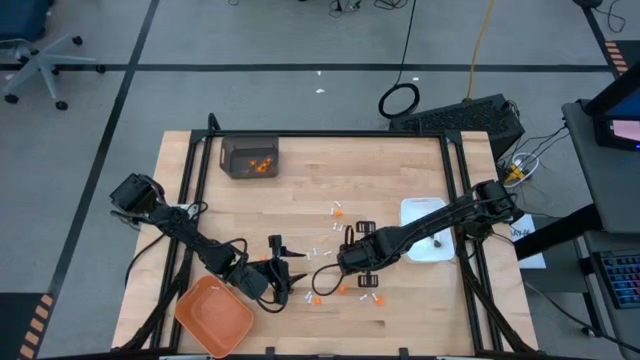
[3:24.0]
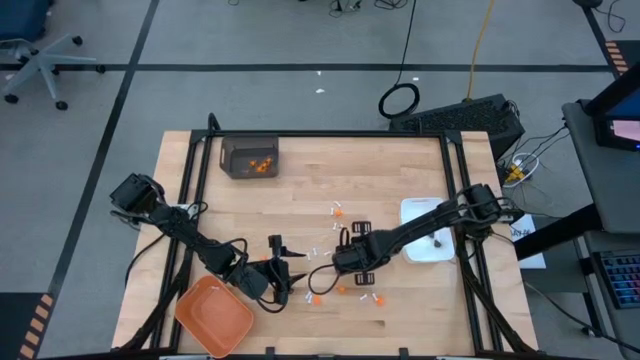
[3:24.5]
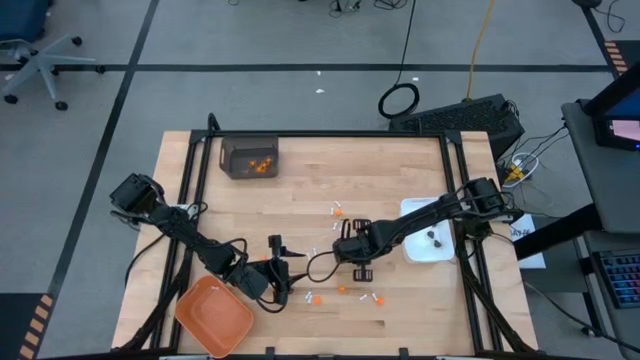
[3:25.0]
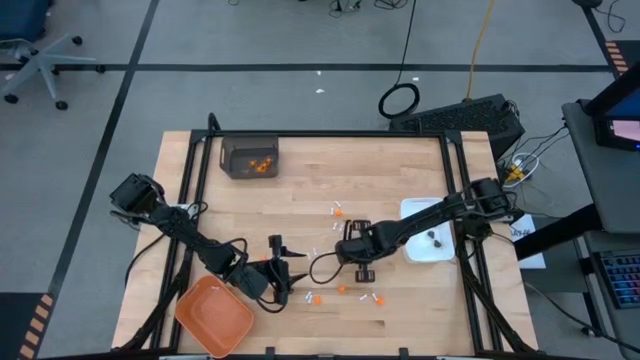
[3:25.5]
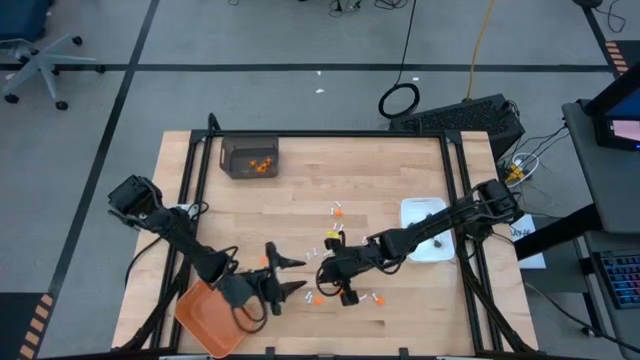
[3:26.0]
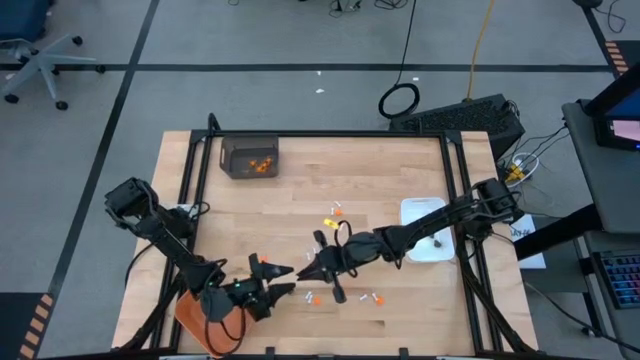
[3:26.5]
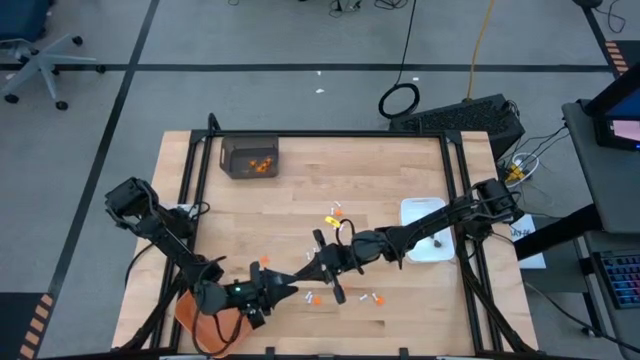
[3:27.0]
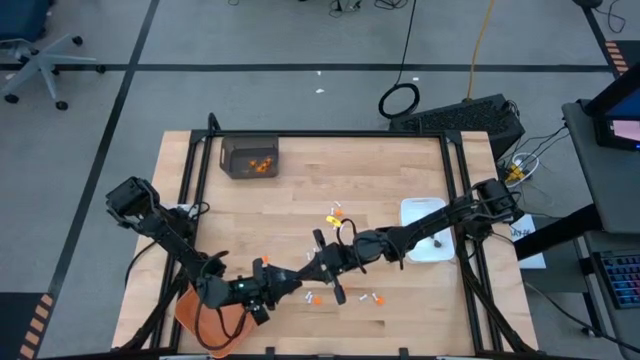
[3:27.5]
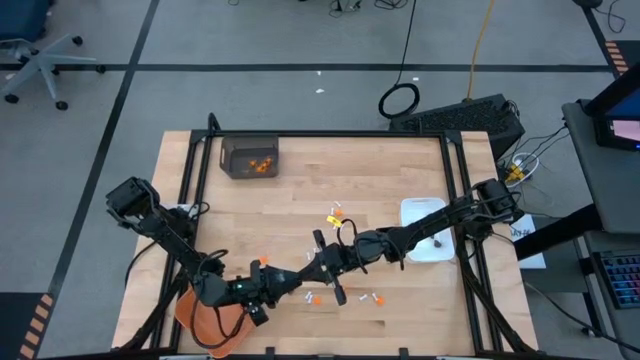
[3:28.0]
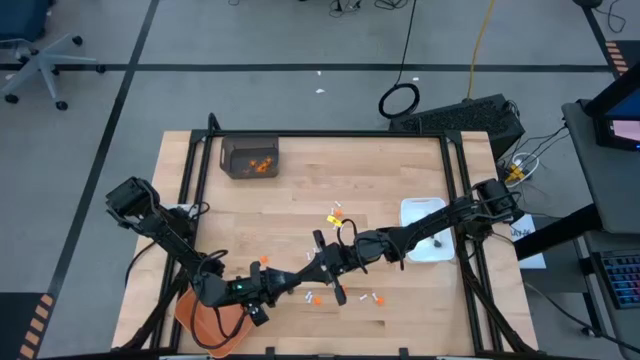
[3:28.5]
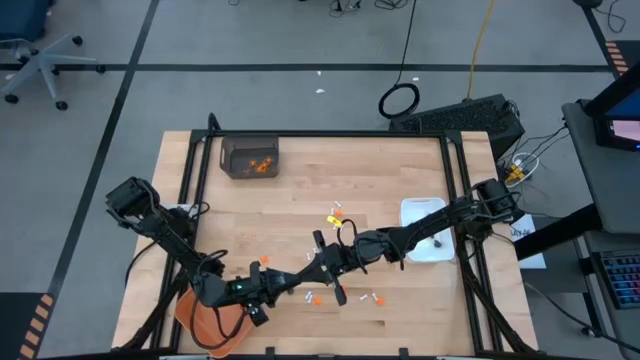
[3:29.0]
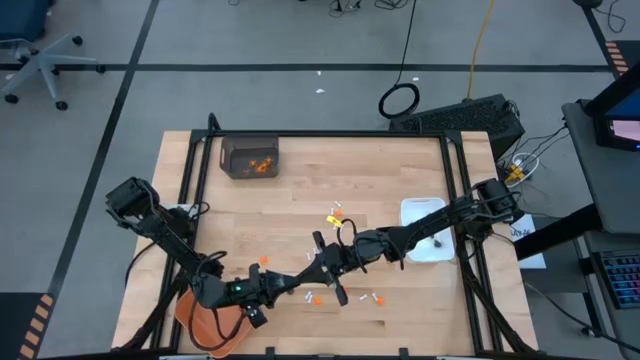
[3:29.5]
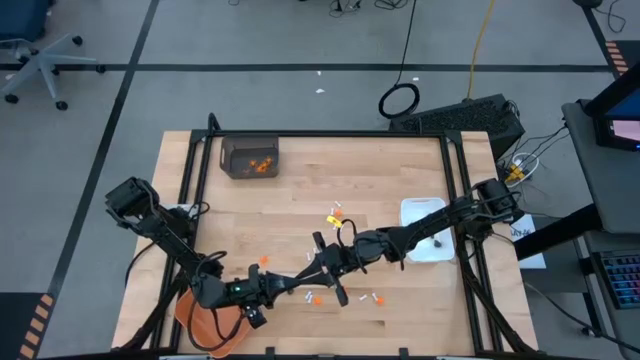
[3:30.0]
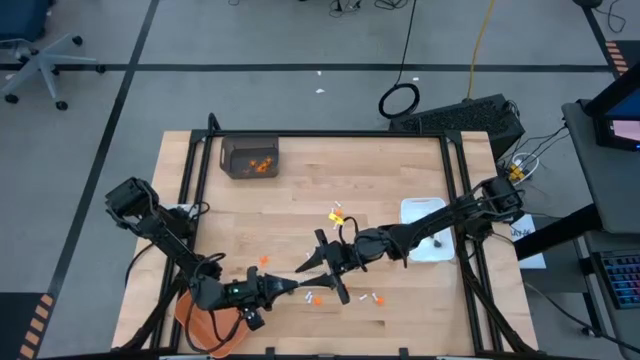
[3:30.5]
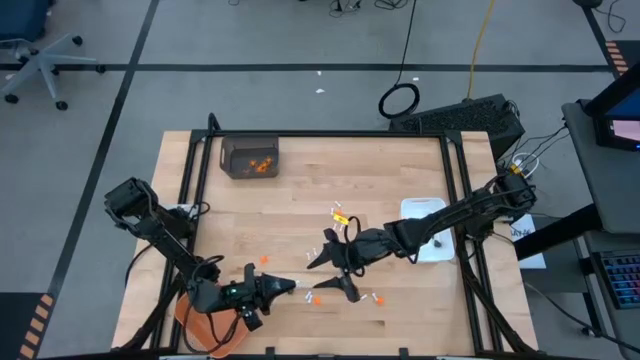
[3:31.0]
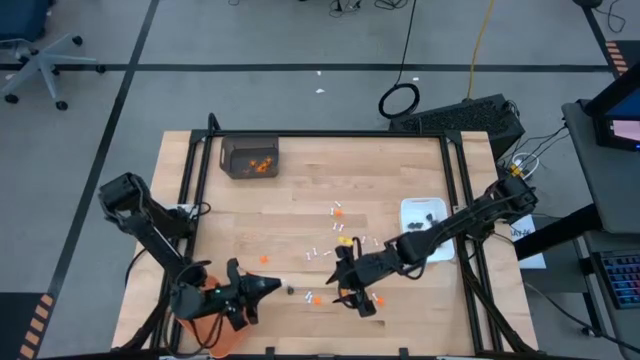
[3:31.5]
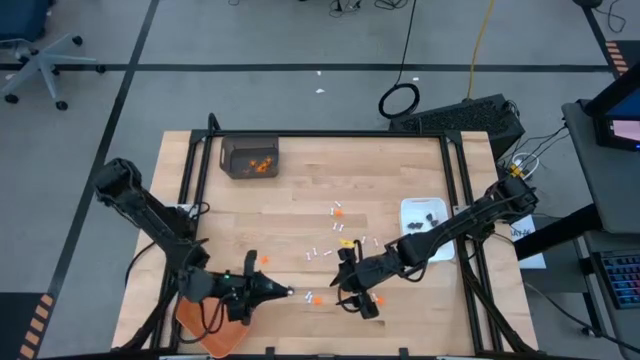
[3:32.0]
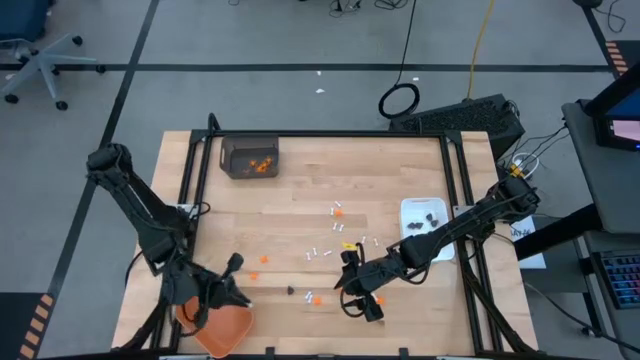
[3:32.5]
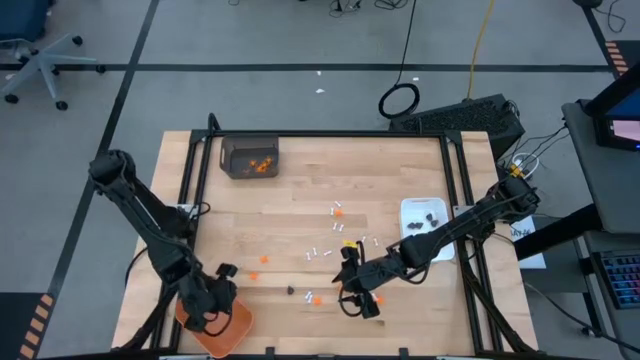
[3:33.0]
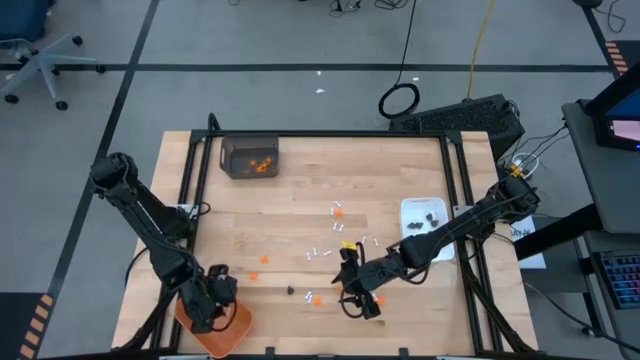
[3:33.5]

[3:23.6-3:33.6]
Task: Sort Halloween decoration
Put the white bone toy into the orange bin

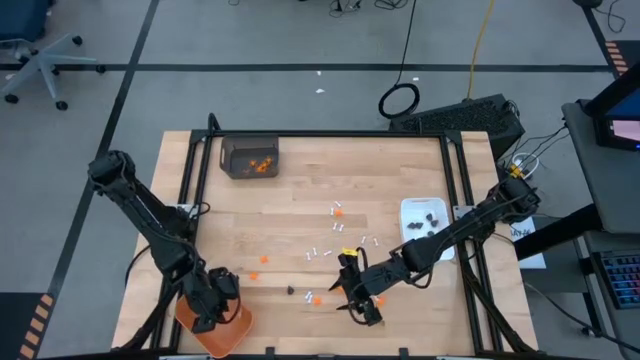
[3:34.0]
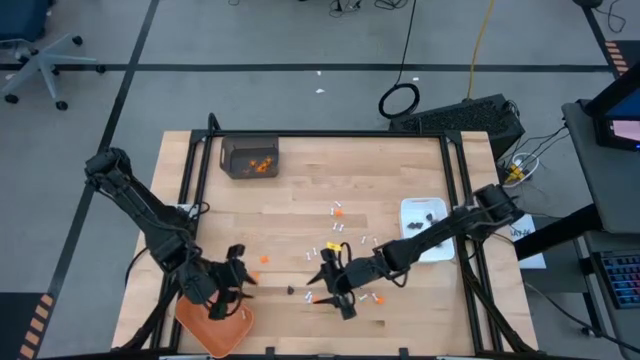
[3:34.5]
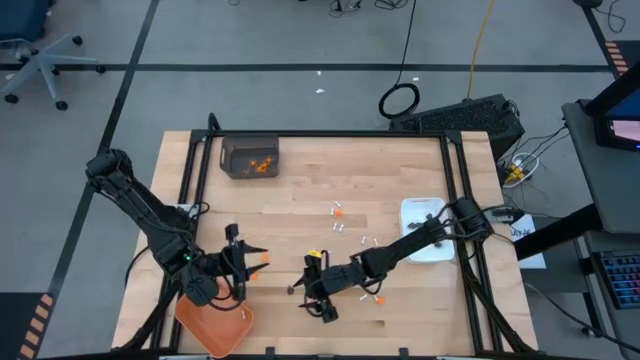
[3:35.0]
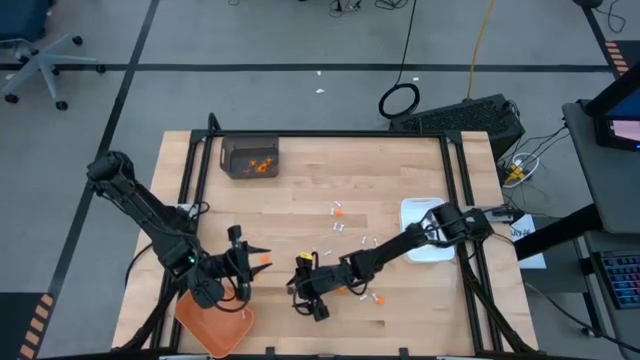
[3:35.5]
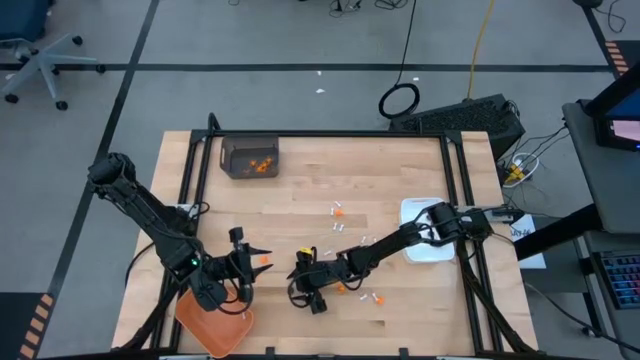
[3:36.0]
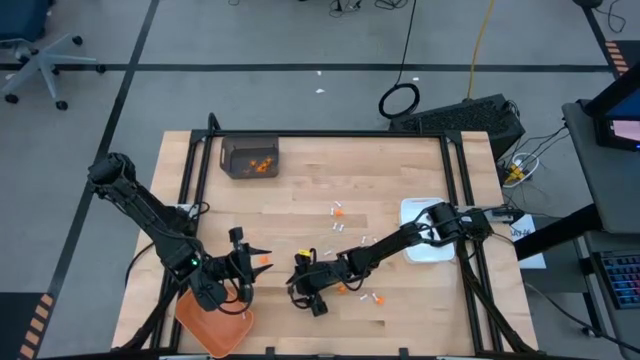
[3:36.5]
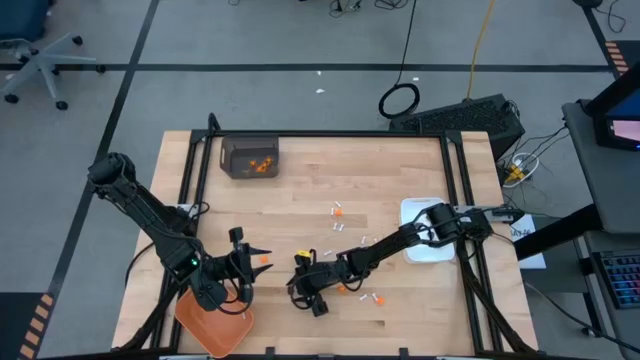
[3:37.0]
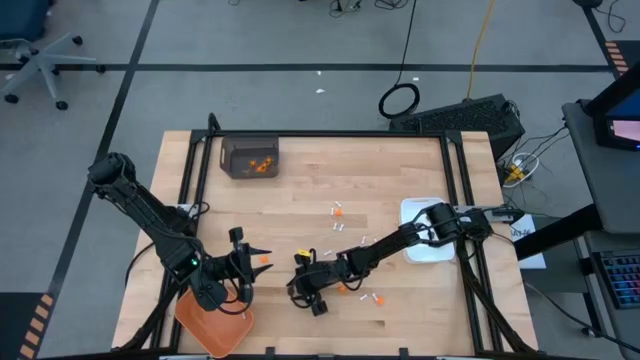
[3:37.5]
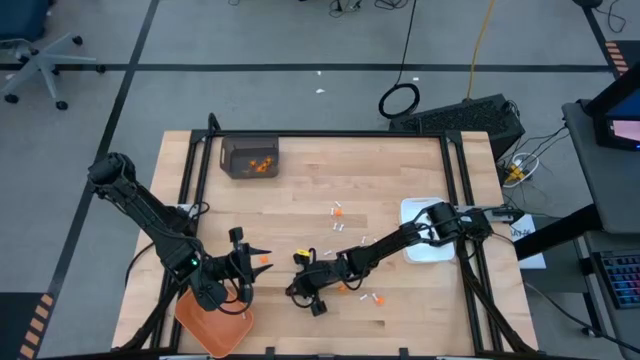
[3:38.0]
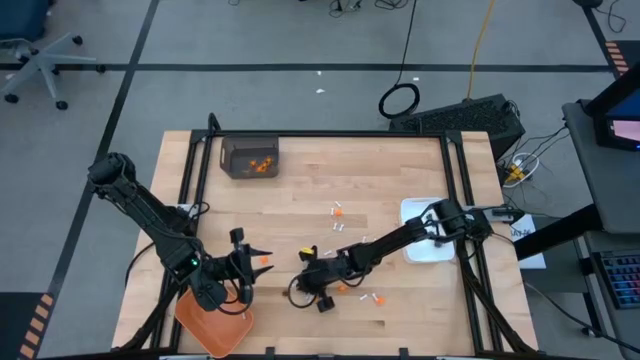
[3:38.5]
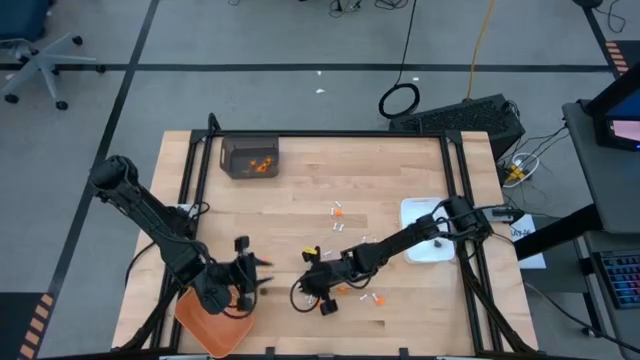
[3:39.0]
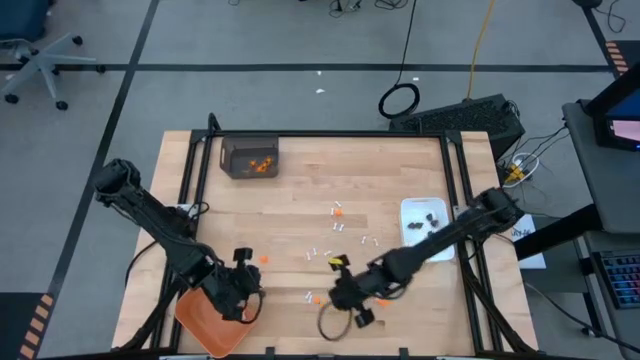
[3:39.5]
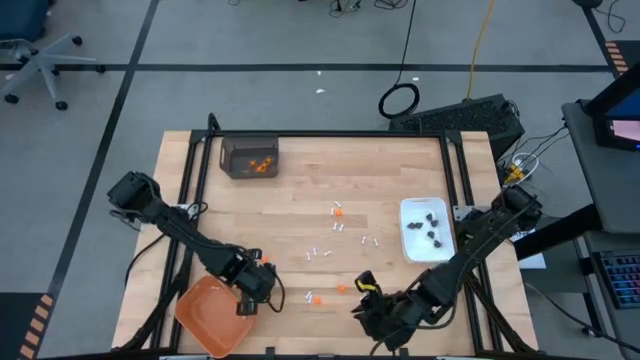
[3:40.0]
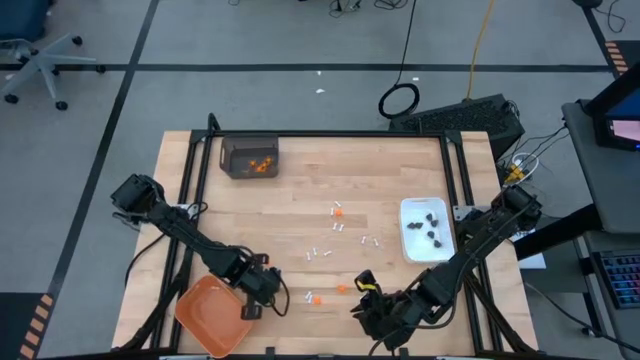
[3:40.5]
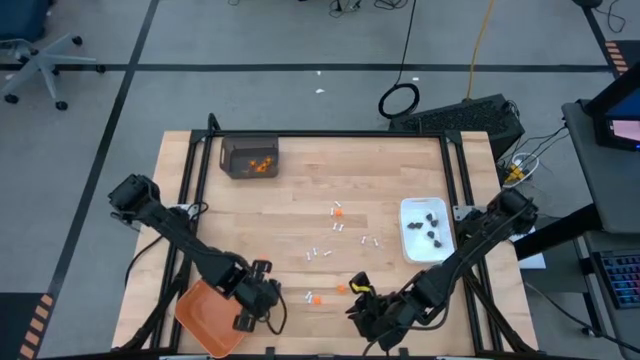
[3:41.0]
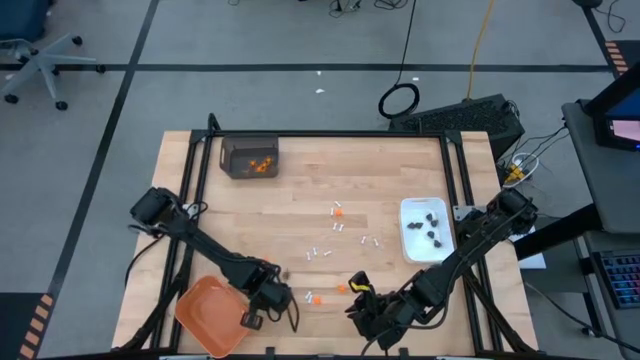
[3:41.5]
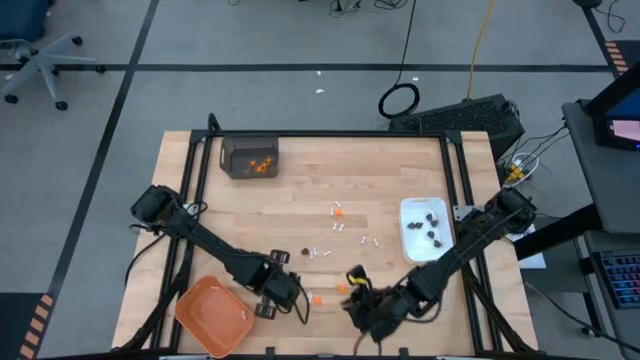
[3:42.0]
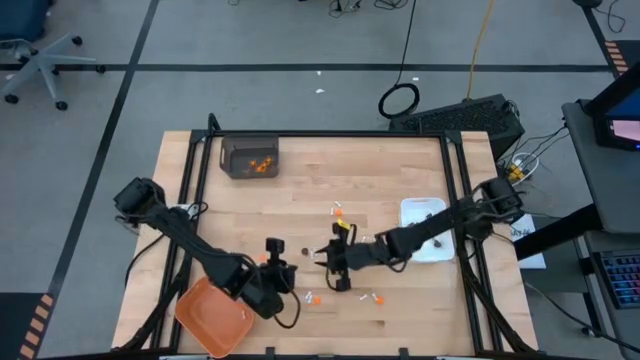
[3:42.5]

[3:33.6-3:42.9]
Put the black skull toy into the orange bin

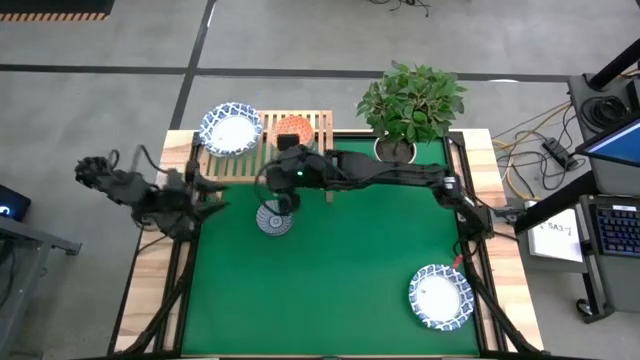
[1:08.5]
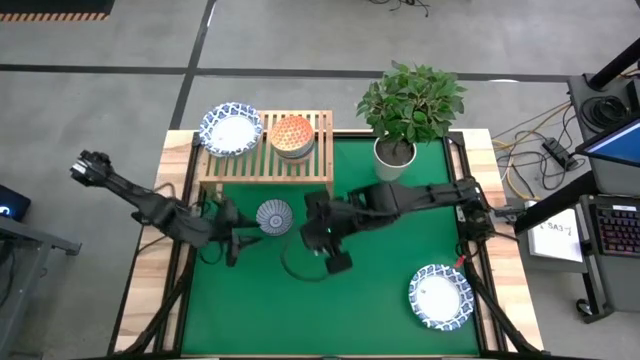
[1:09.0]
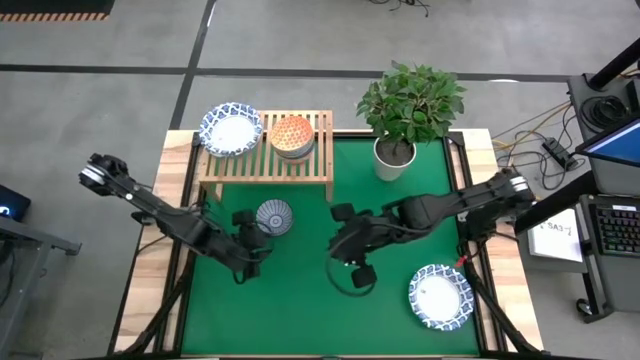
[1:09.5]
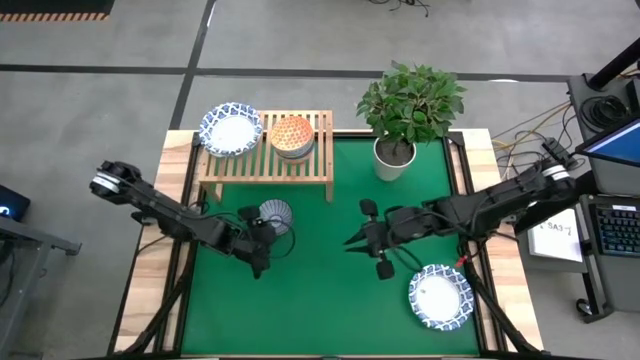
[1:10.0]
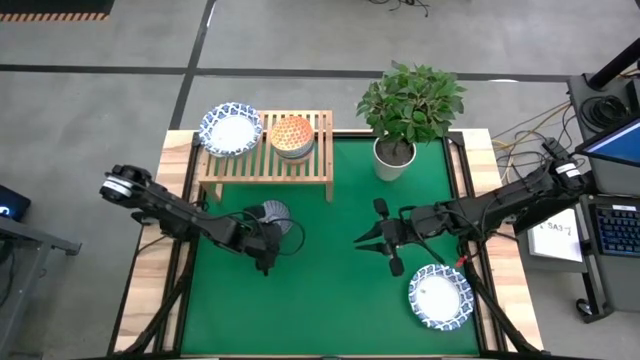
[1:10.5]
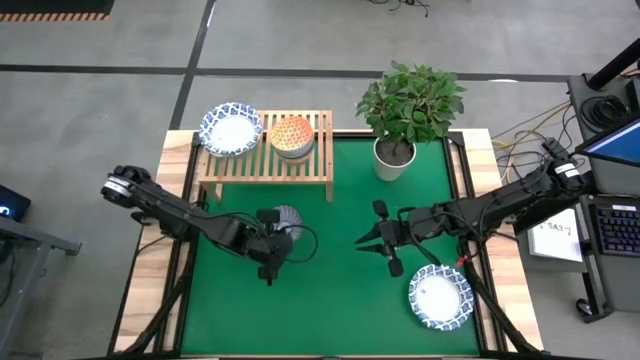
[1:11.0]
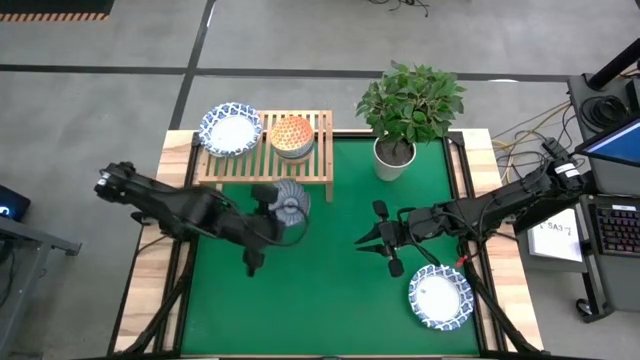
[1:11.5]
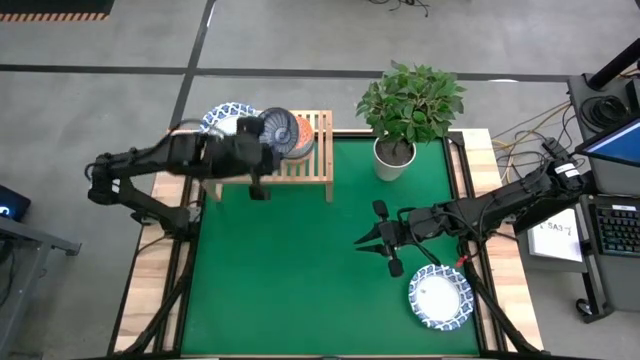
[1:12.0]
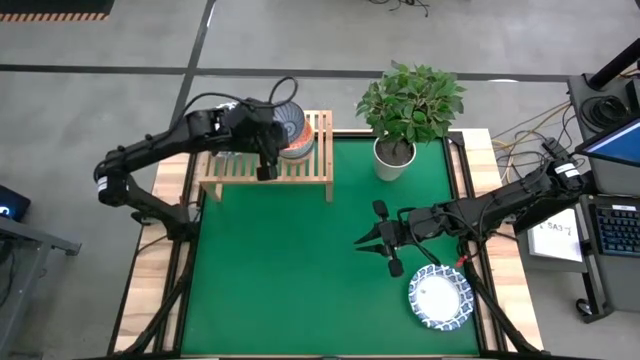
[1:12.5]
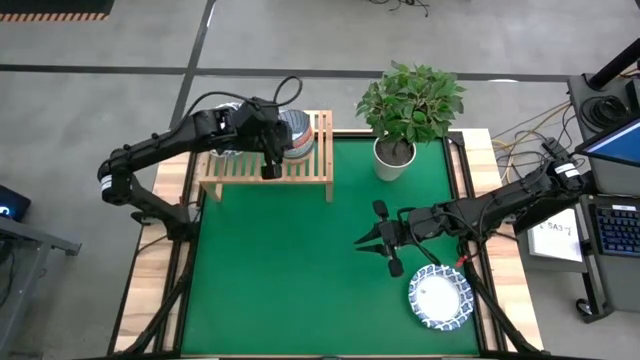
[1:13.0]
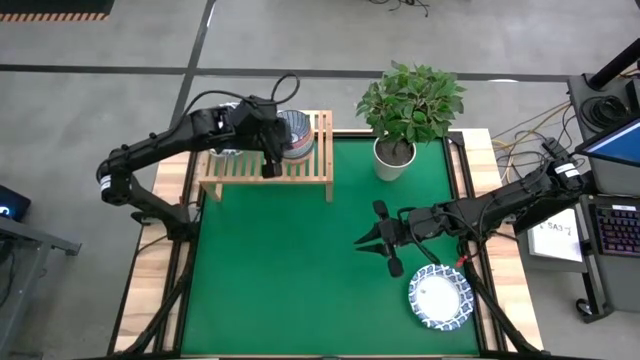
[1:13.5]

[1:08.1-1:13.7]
Task: Place and stack bowls onto a shelf
Stack the blue bowl on top of the orange bowl on the shelf
